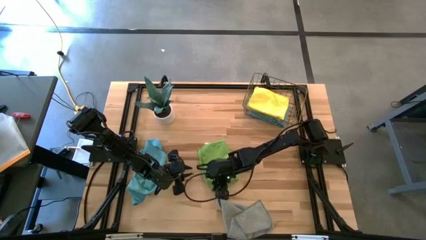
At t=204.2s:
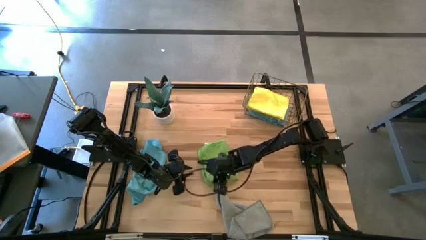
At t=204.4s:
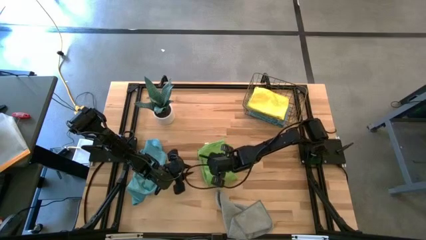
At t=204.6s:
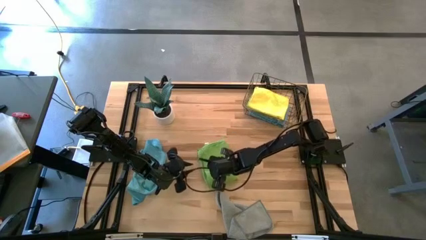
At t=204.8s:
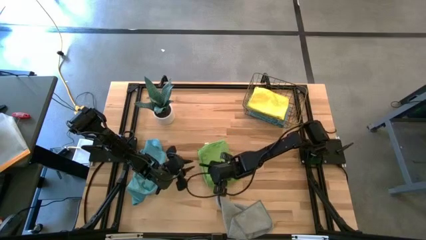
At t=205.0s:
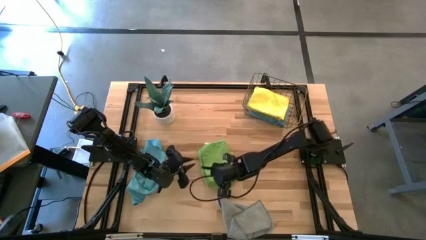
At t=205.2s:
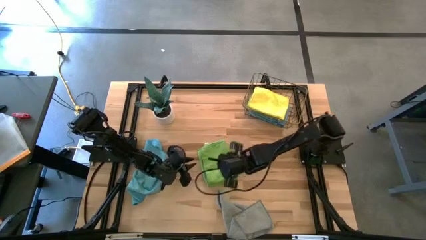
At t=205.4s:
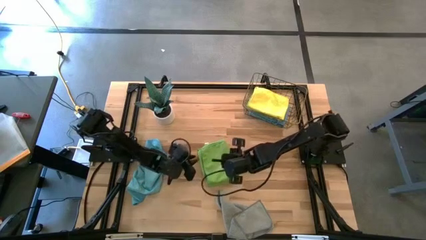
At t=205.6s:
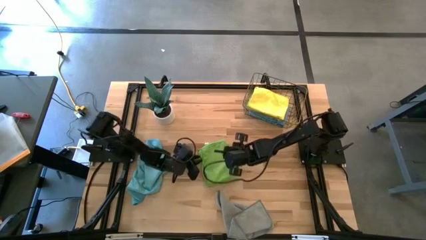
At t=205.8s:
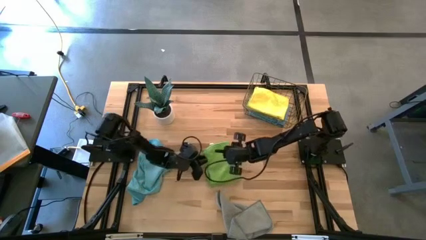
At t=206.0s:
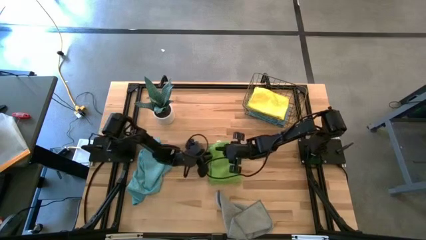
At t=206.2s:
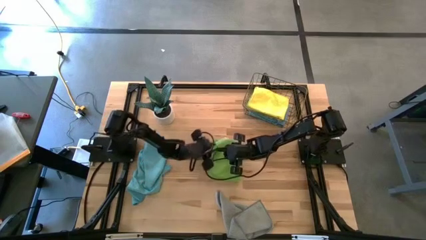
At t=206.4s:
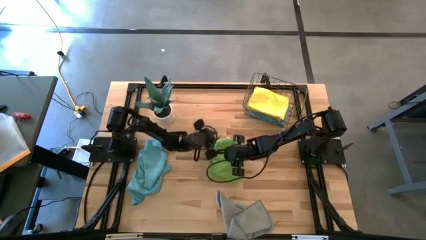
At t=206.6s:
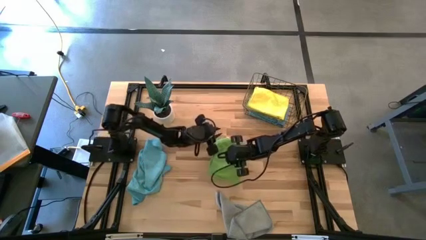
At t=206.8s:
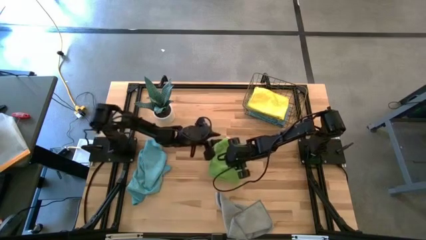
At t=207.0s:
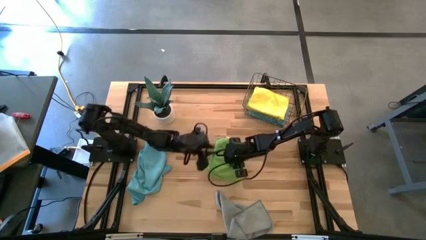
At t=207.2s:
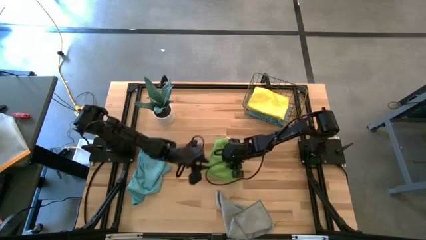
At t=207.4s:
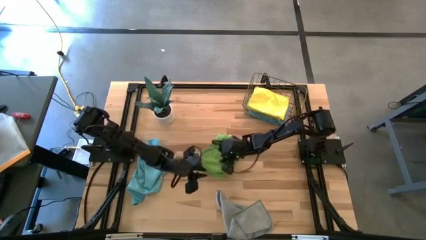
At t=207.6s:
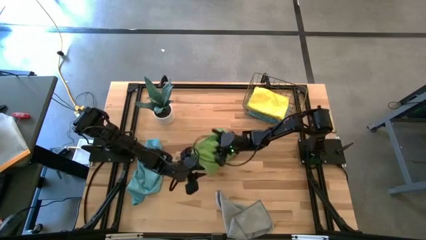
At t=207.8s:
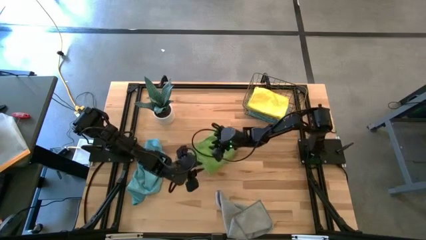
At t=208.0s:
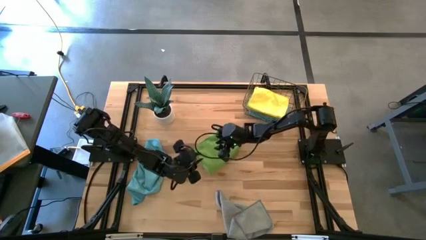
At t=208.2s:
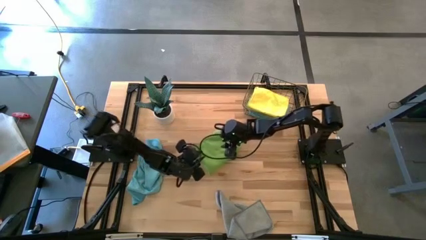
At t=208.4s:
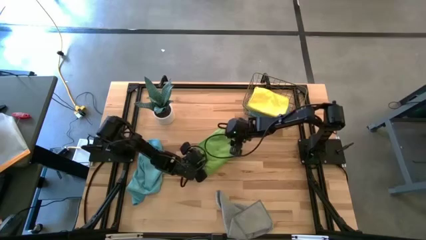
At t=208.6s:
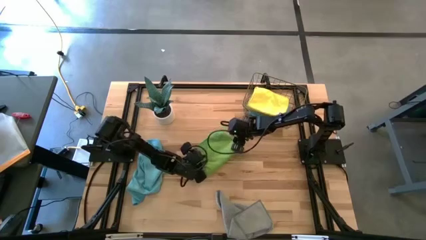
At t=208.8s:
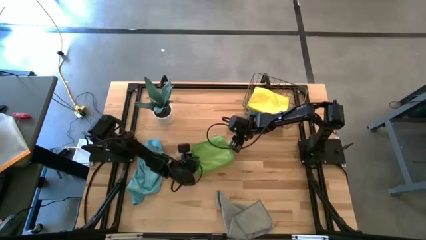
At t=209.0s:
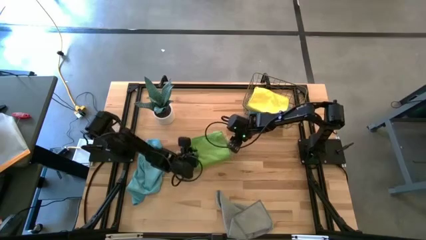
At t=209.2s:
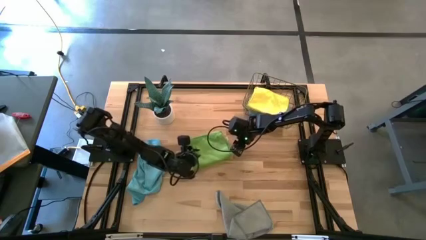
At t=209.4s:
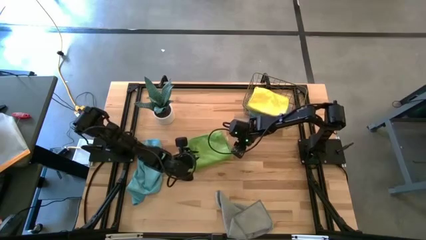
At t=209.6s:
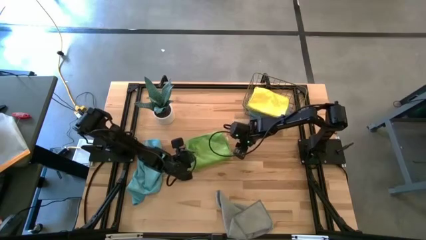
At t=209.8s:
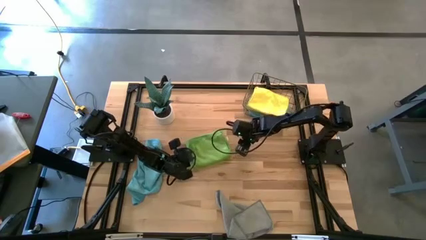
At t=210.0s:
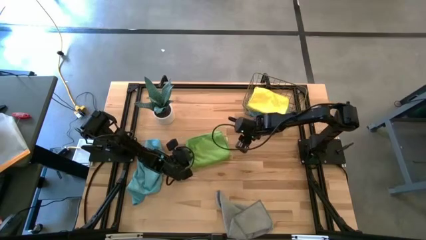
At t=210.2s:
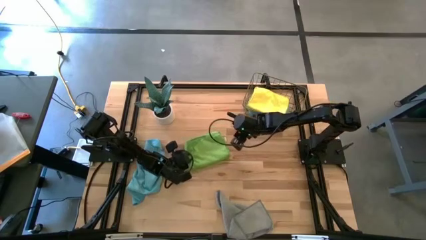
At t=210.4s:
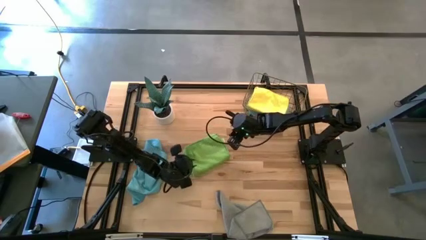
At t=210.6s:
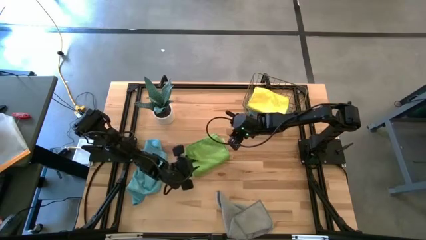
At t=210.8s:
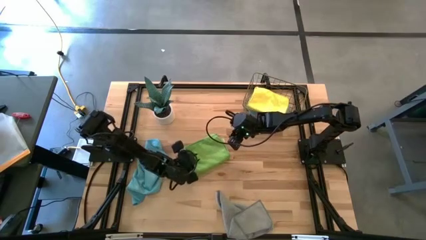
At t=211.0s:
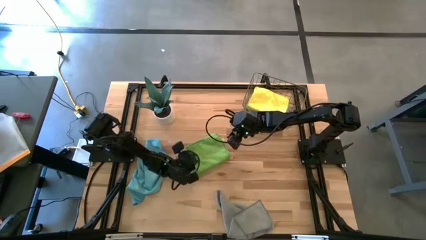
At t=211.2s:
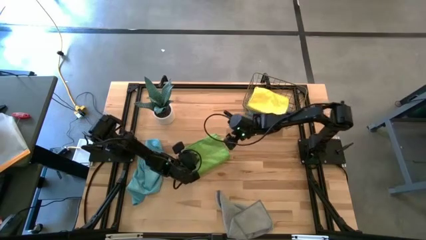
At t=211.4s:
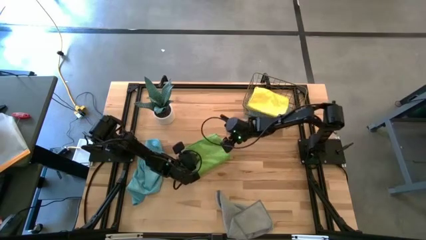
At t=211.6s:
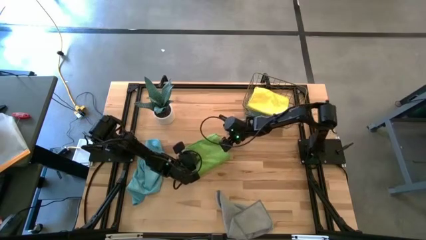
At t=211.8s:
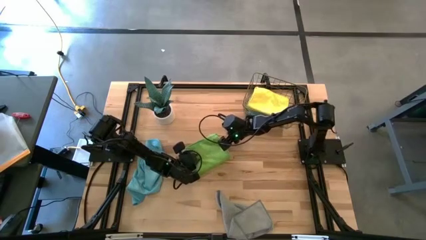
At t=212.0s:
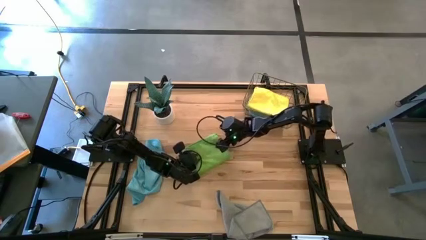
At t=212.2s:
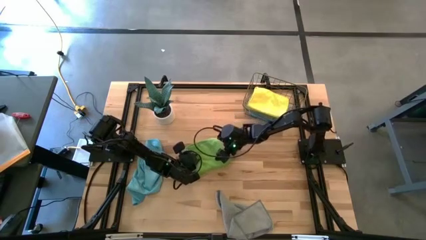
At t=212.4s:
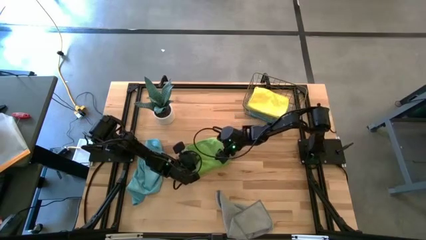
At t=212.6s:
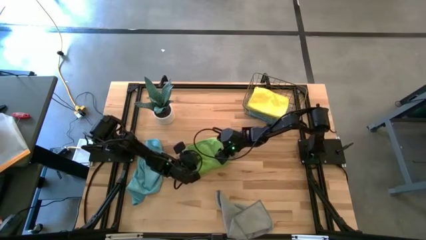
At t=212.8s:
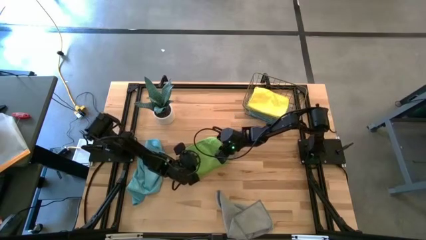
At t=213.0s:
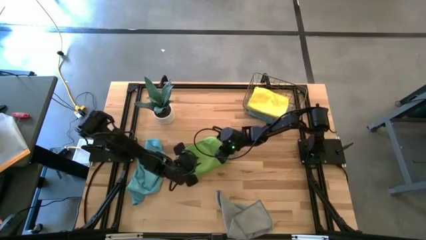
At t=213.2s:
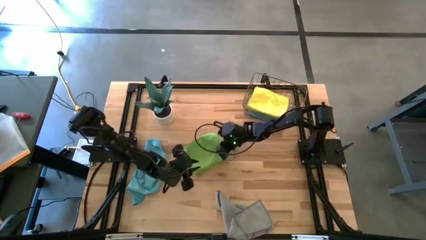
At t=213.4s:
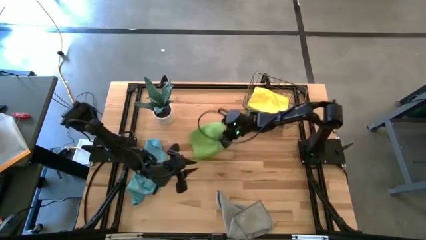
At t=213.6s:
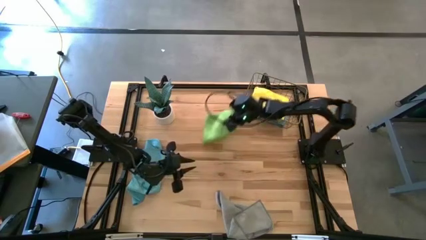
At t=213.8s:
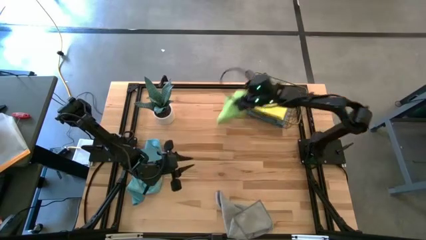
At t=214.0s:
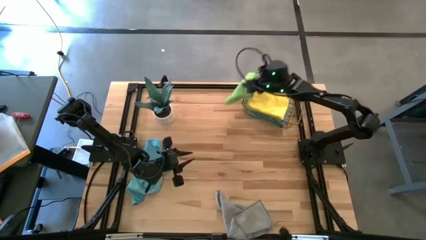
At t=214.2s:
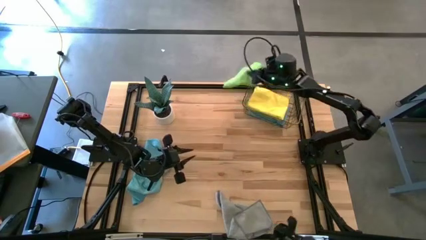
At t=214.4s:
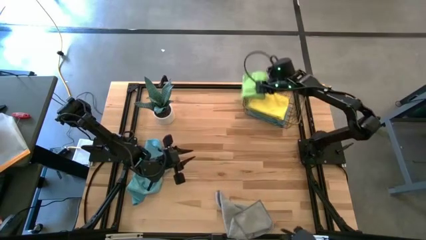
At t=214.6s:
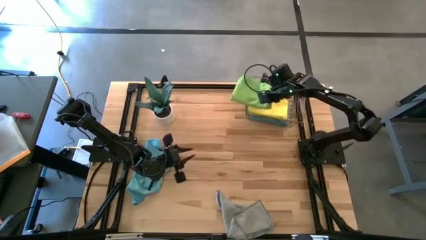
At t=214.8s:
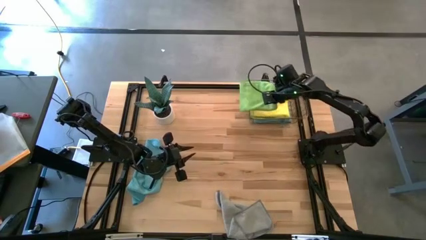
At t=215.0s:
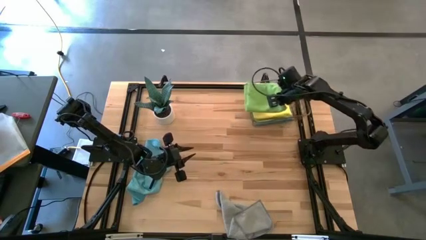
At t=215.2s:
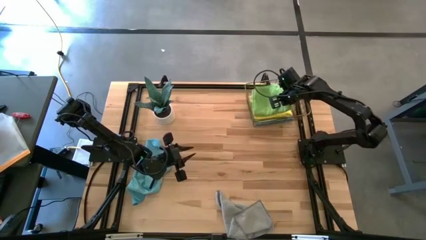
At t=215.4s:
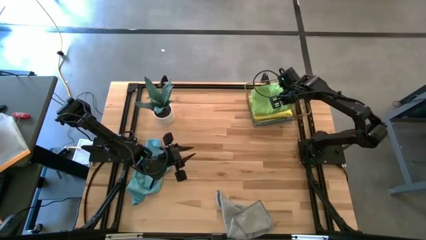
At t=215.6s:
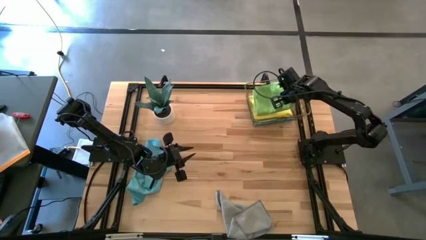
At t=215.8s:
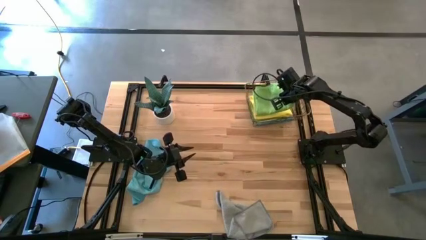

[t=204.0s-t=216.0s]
Task: Fold microfiber towels
Put the green towel into the wire basket
